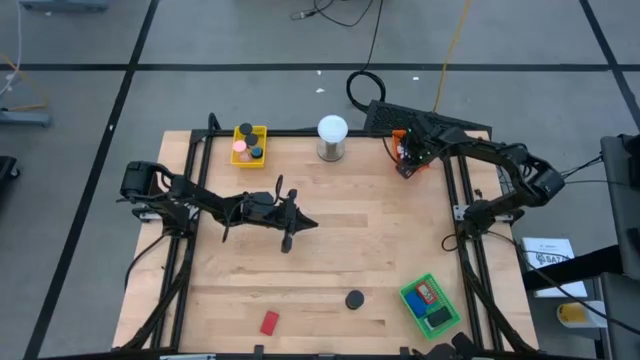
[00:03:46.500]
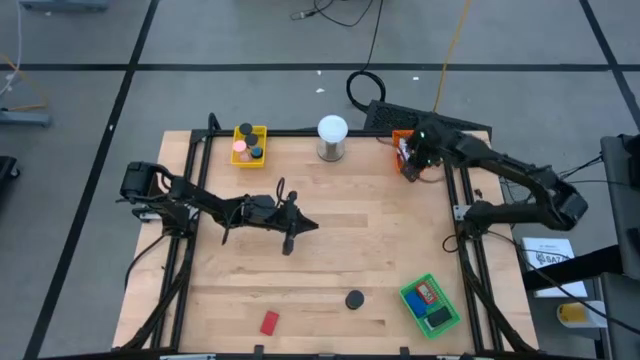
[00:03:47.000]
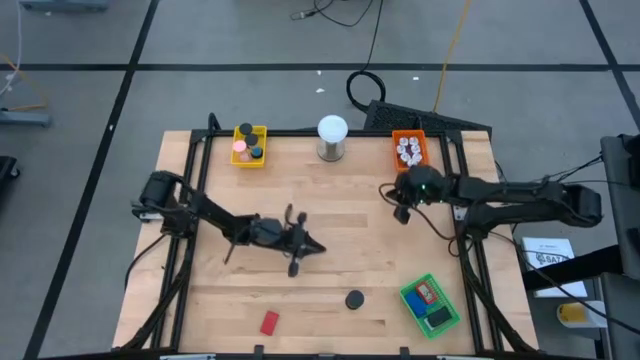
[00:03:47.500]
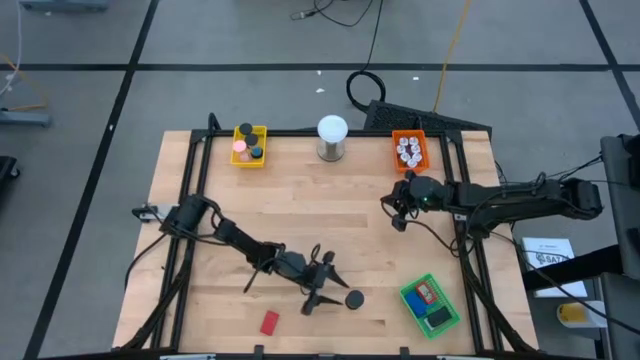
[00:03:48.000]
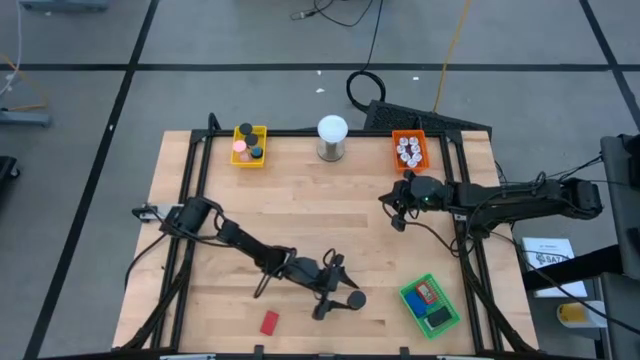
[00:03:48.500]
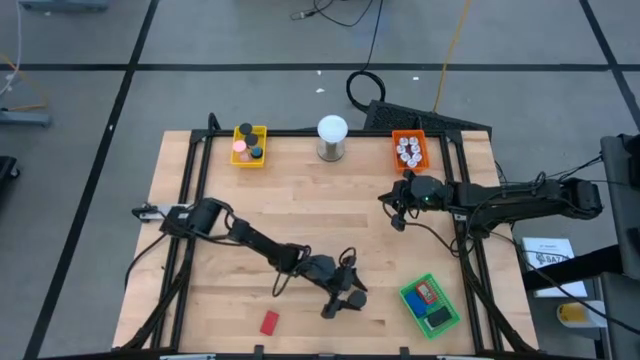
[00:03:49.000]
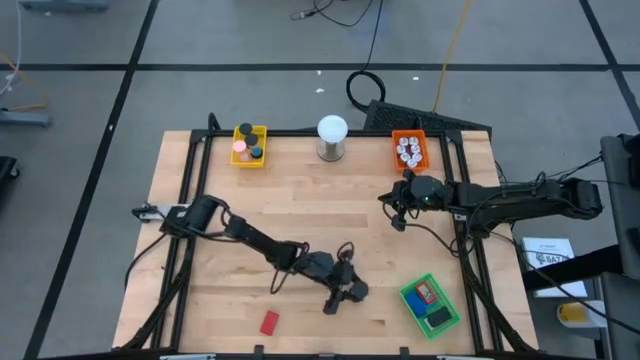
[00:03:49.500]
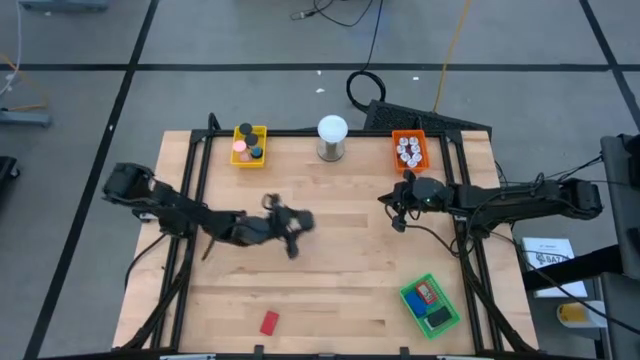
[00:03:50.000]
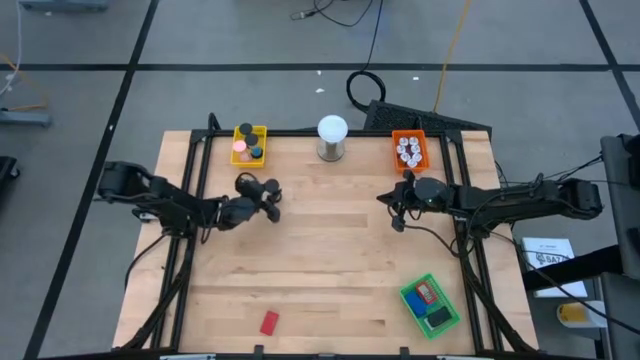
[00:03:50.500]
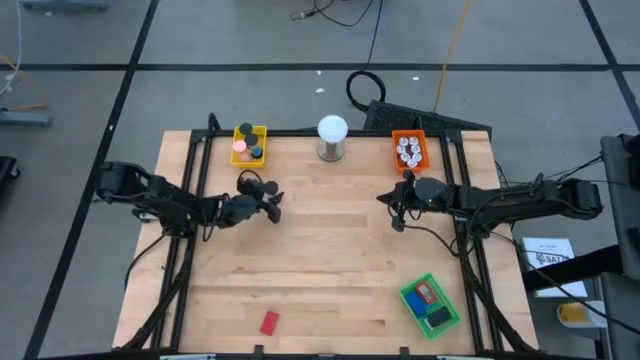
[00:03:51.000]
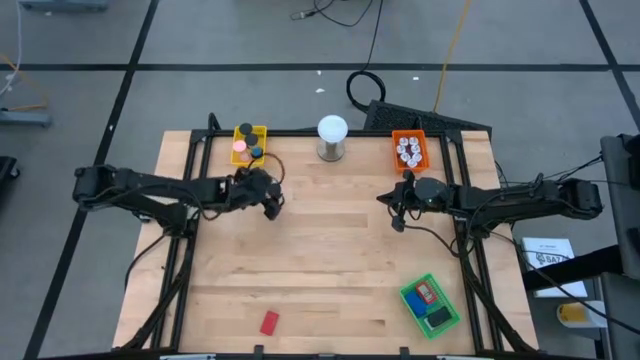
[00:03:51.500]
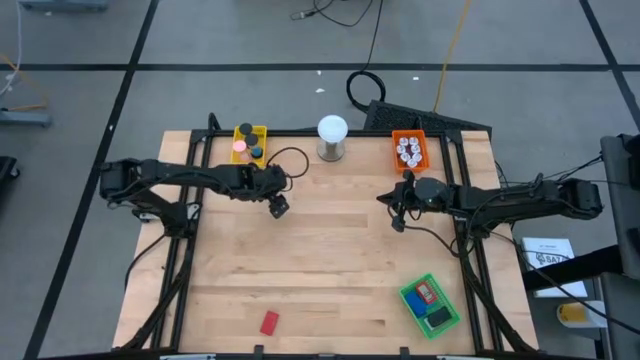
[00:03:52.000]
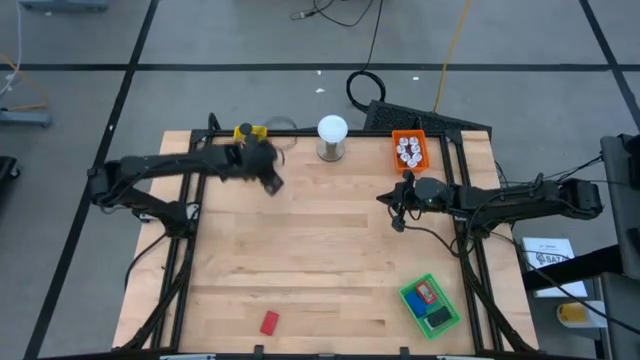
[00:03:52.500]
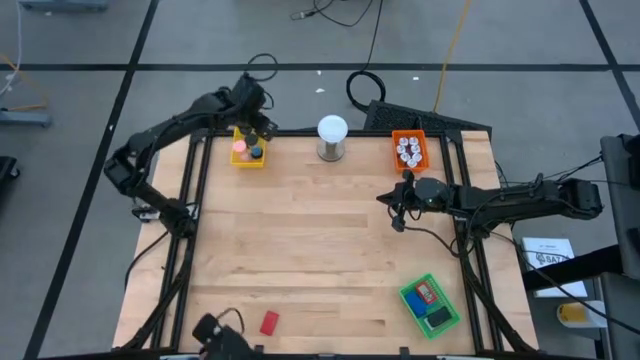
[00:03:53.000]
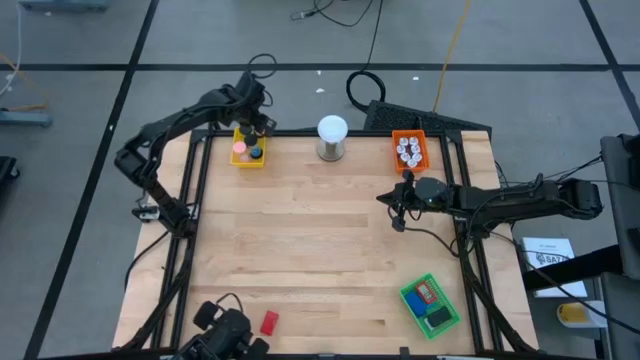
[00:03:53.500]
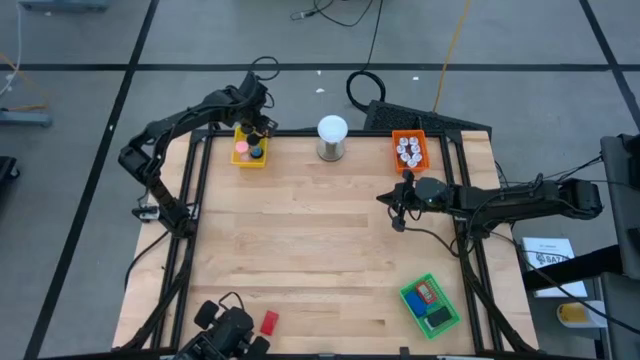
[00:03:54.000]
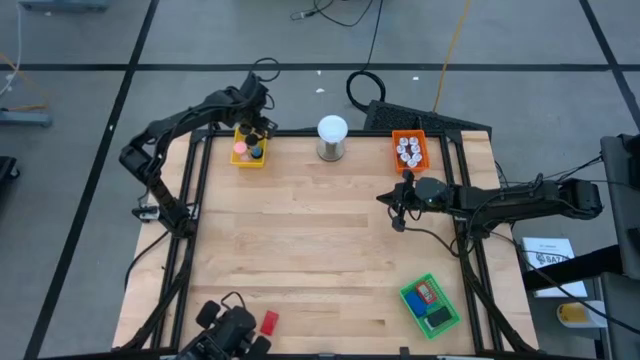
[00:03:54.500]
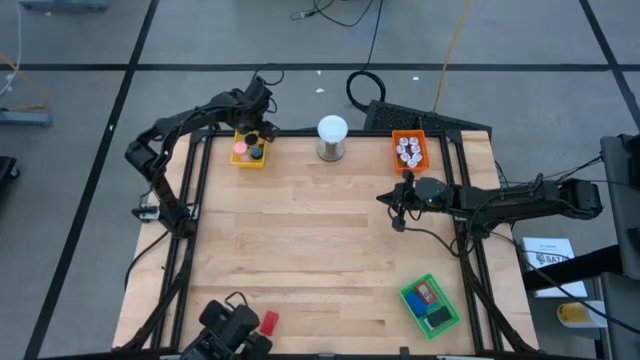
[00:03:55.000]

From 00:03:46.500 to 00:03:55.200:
Task: Pick & Place Office items
Put the orange hour glass into the yellow bin

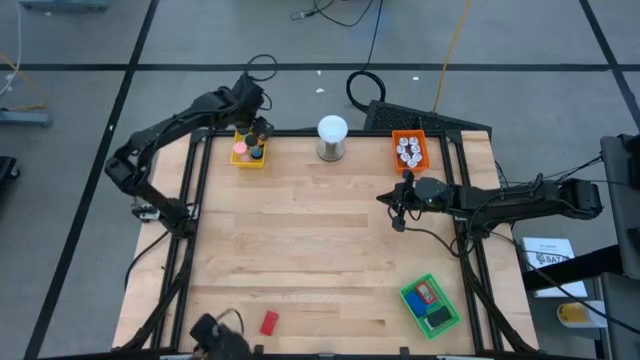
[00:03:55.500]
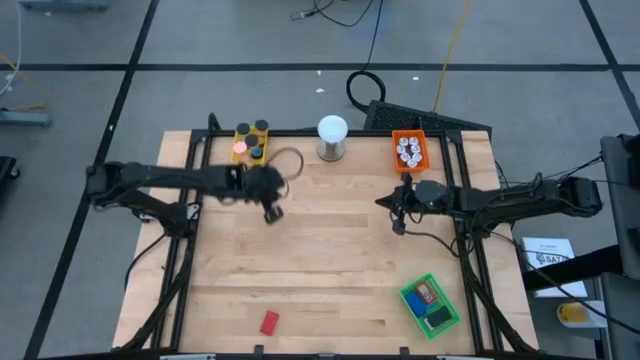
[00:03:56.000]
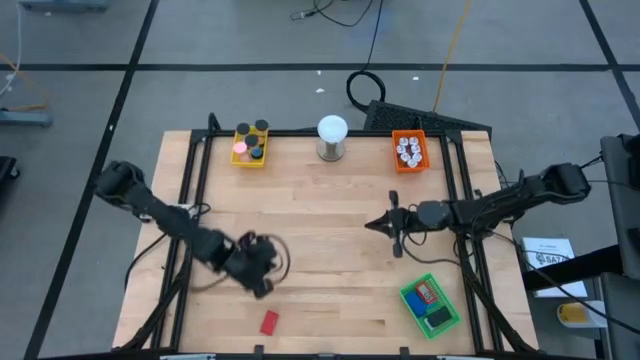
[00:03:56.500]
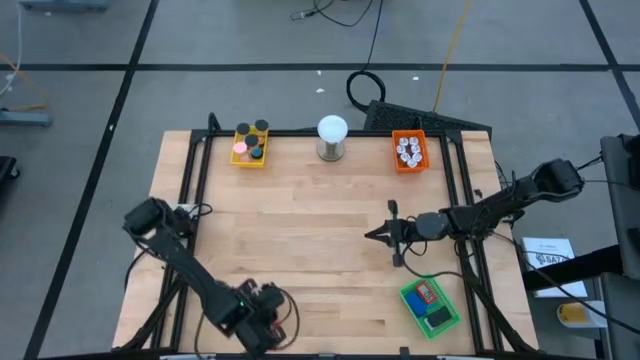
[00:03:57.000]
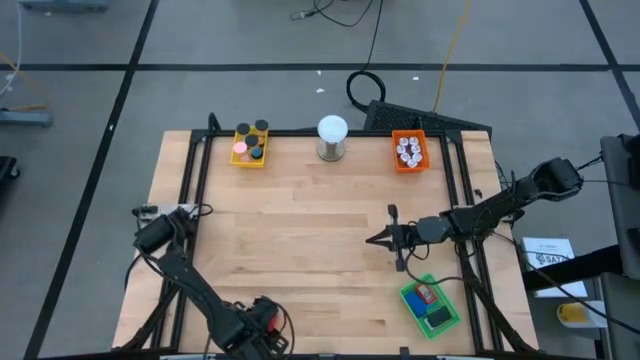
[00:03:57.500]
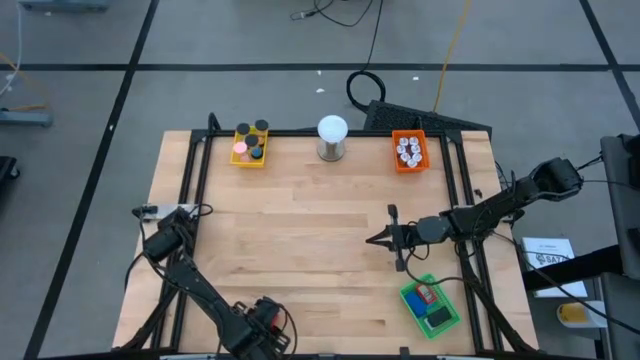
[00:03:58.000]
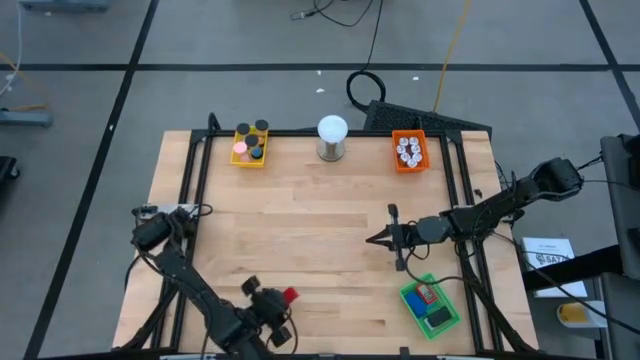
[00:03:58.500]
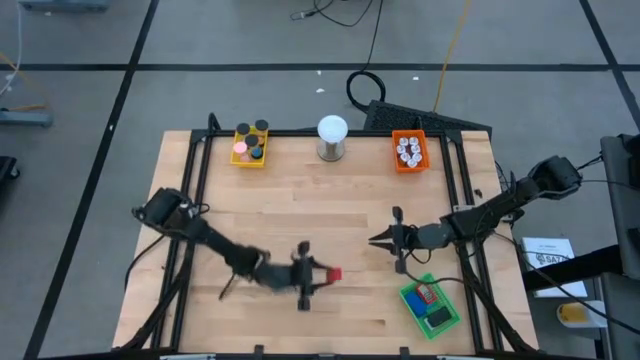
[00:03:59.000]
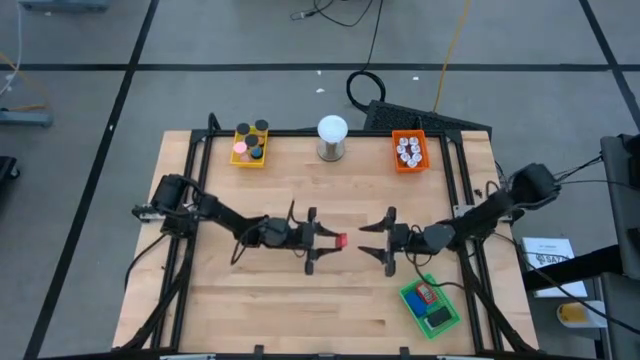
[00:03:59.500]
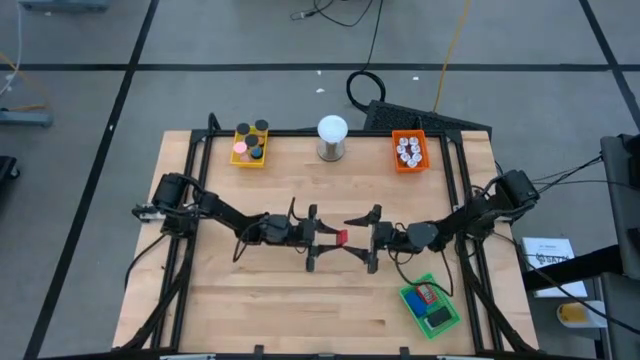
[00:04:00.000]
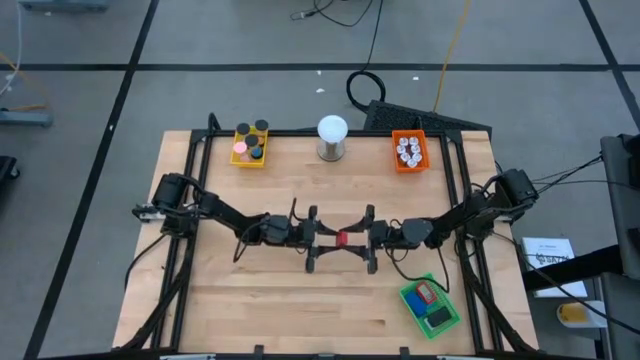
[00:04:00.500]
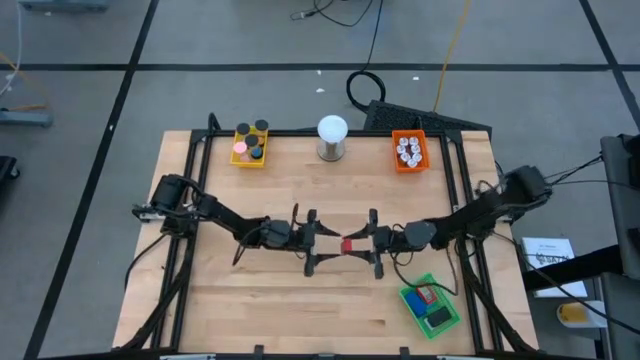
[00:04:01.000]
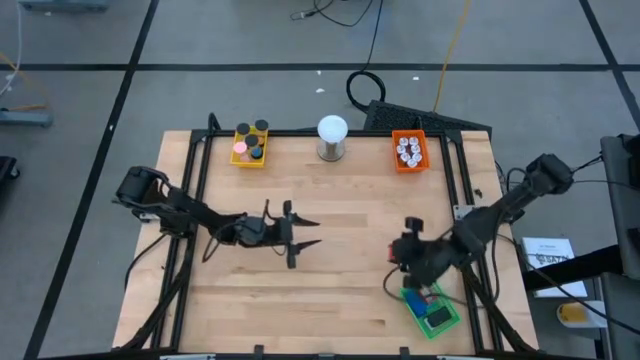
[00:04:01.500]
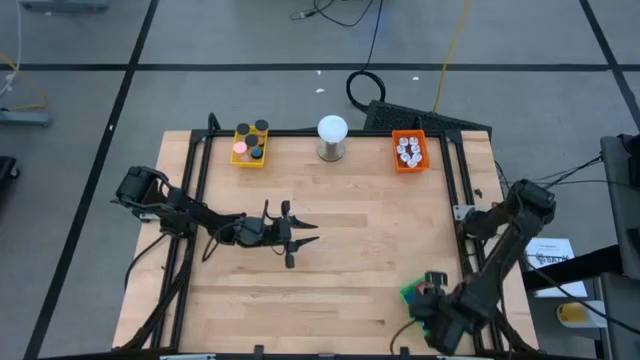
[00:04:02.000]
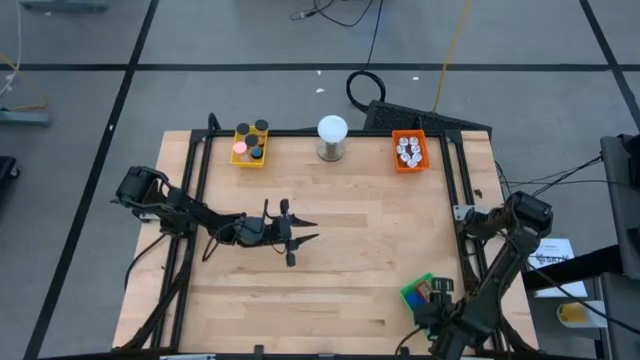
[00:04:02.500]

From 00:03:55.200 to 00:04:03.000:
Put the red digital clock into the green bin

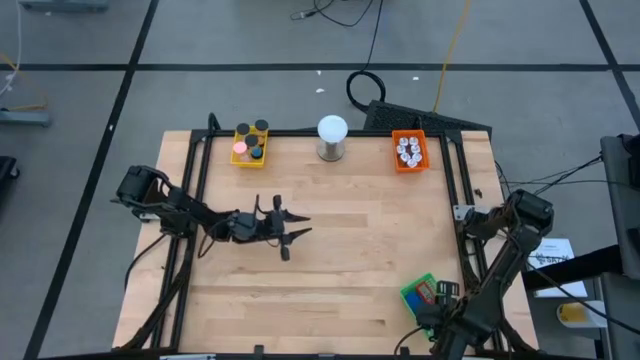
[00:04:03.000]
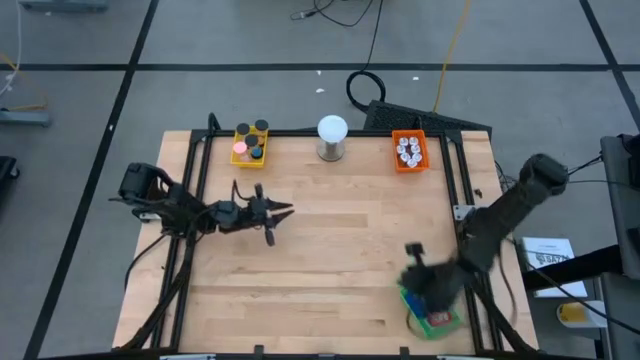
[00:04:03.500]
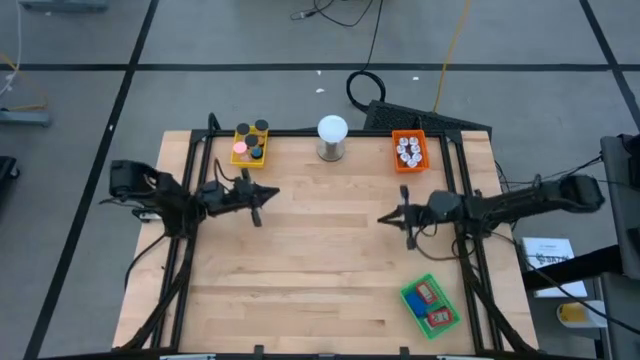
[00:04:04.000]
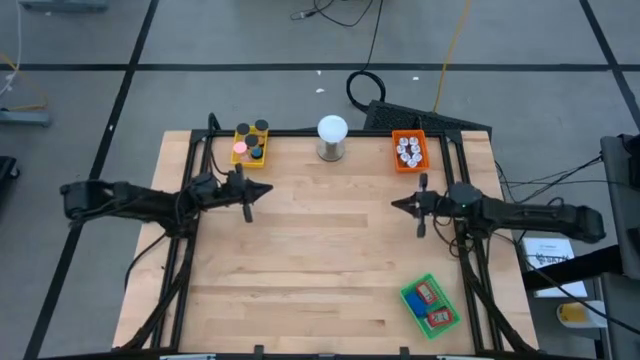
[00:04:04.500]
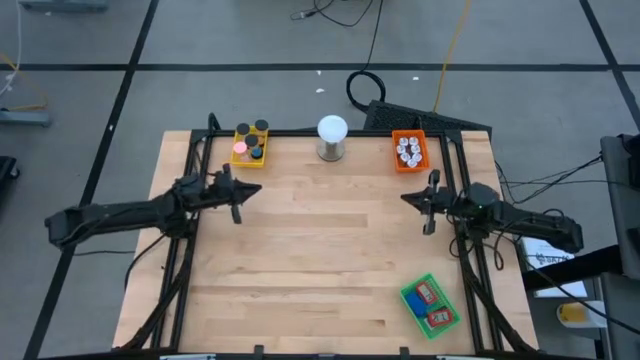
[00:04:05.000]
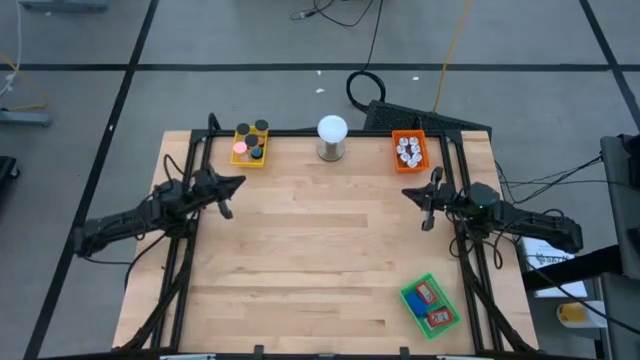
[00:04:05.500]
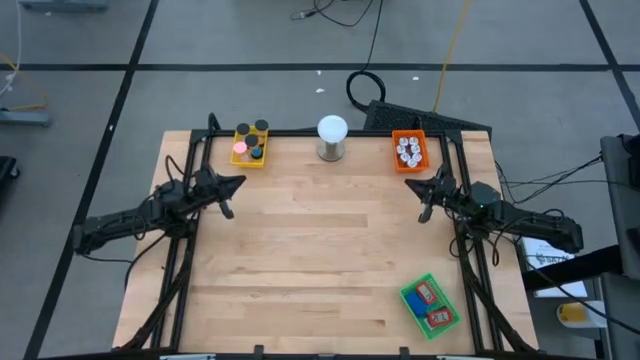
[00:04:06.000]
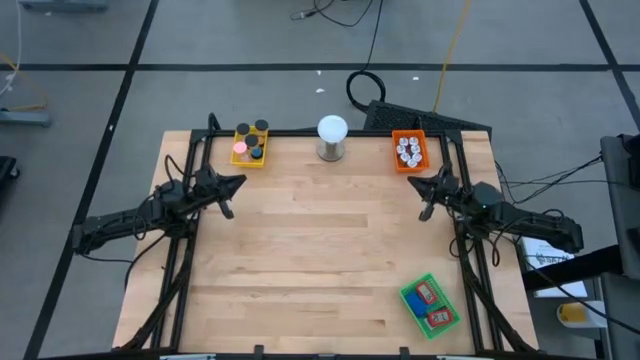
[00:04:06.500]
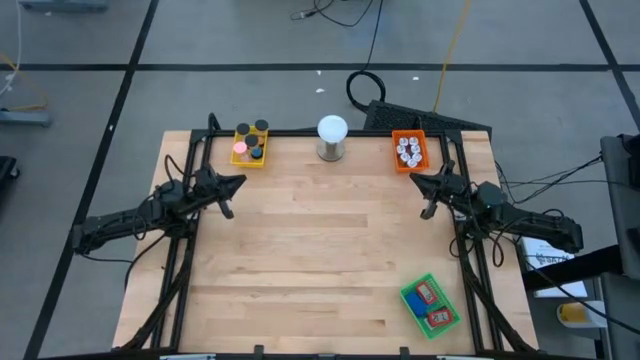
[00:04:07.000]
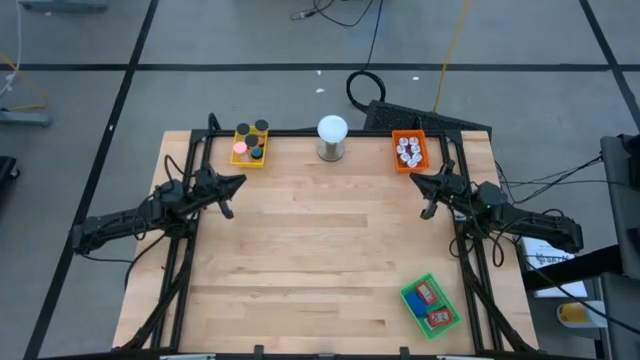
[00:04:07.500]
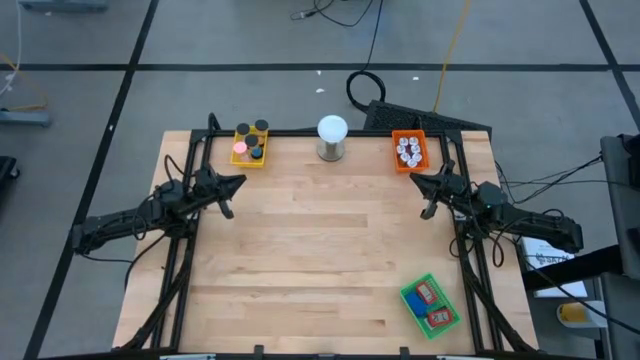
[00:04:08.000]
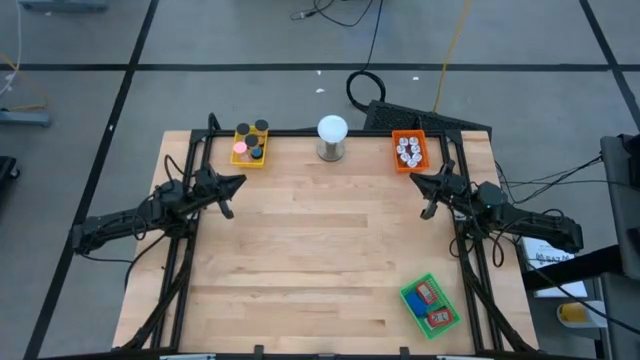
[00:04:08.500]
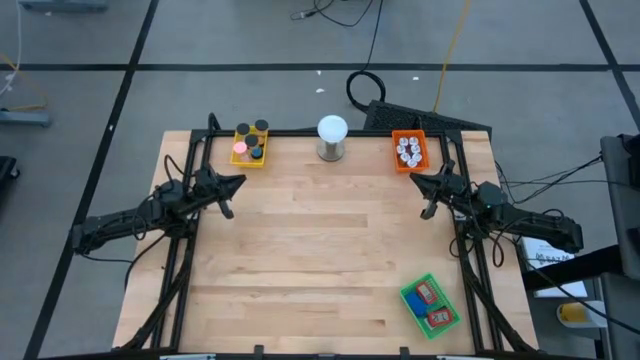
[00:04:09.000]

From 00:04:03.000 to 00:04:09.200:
Return to Home Position
